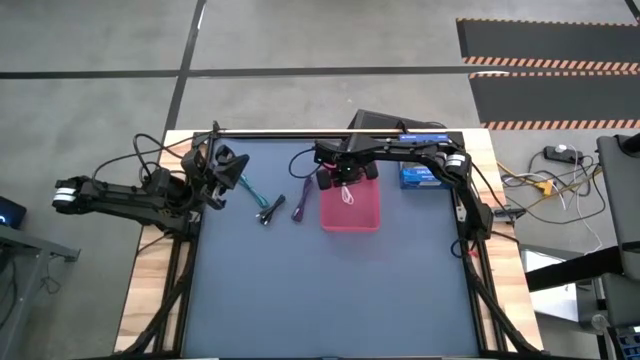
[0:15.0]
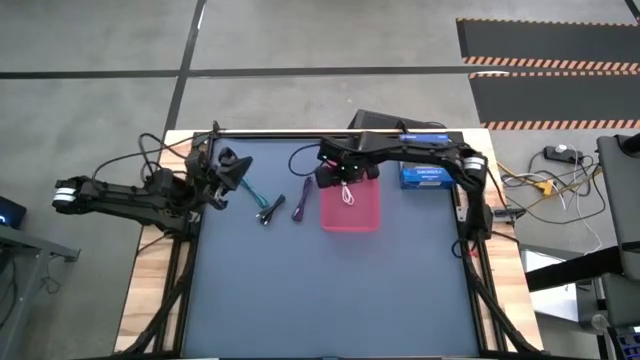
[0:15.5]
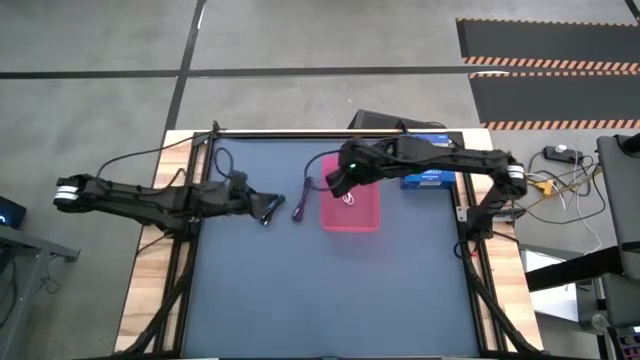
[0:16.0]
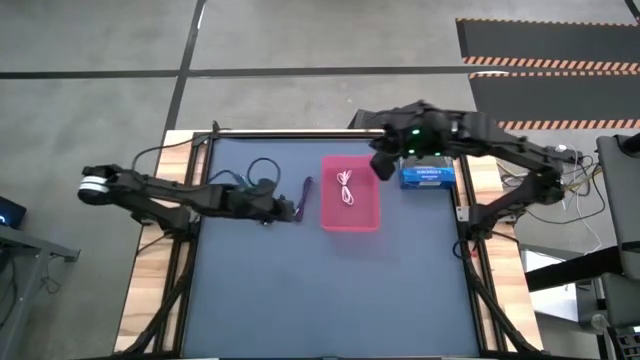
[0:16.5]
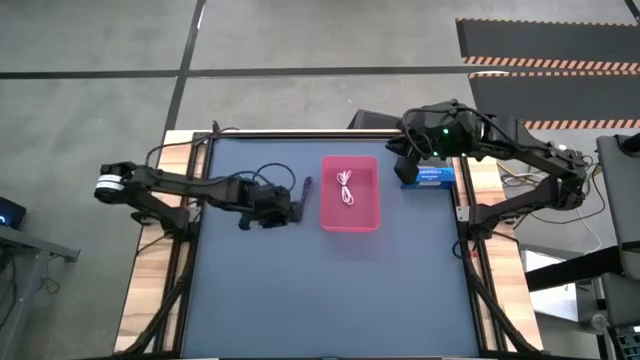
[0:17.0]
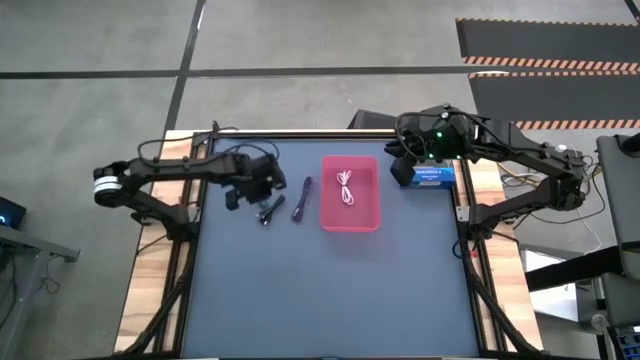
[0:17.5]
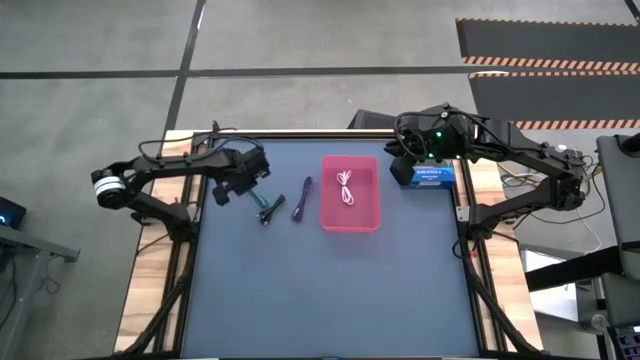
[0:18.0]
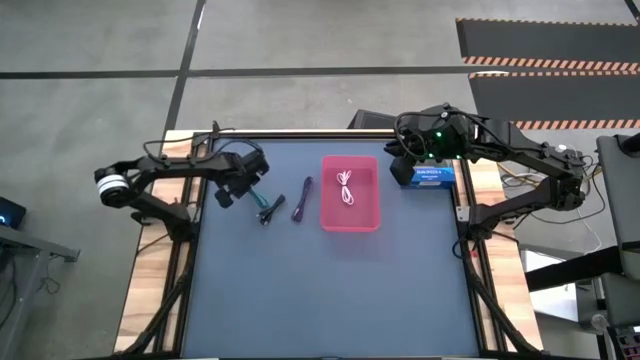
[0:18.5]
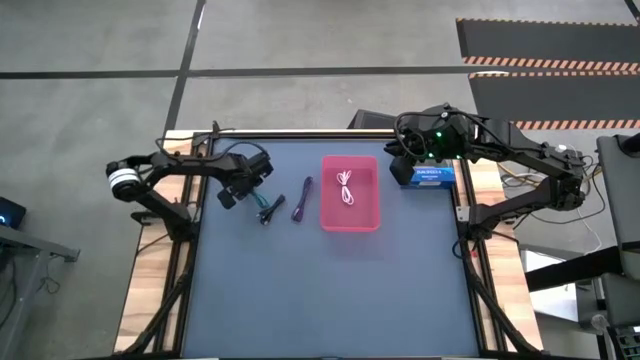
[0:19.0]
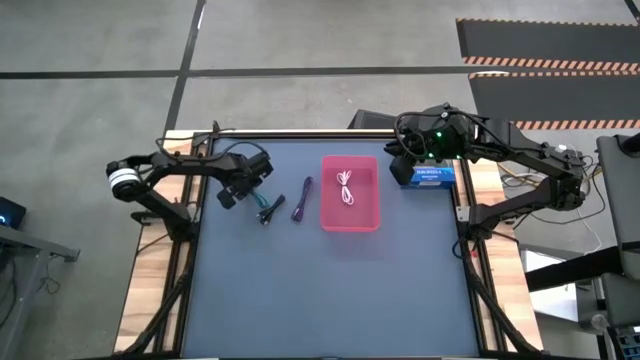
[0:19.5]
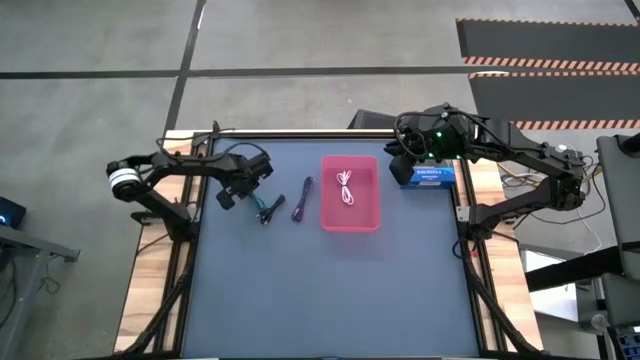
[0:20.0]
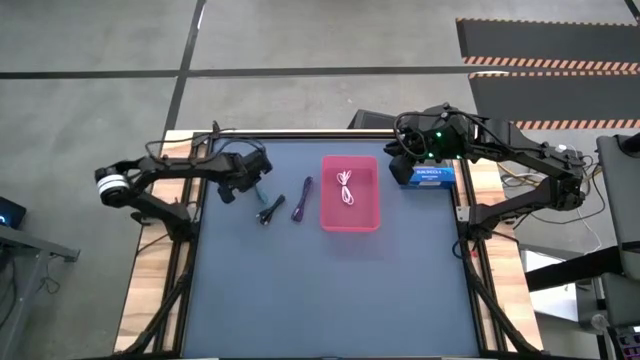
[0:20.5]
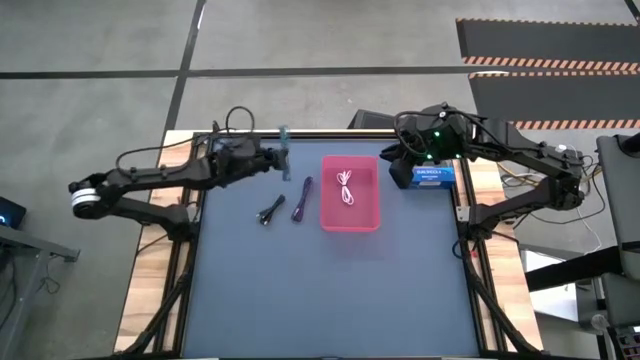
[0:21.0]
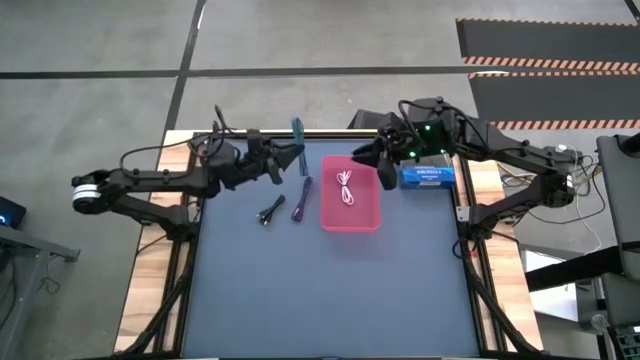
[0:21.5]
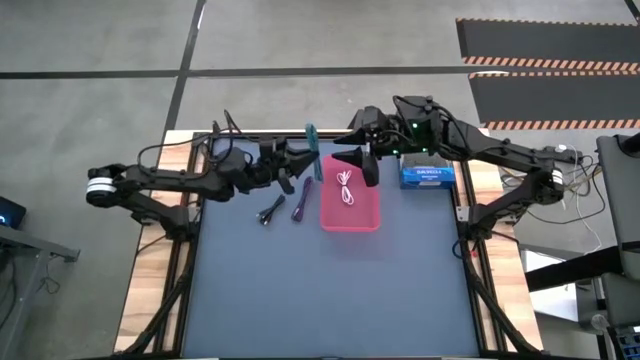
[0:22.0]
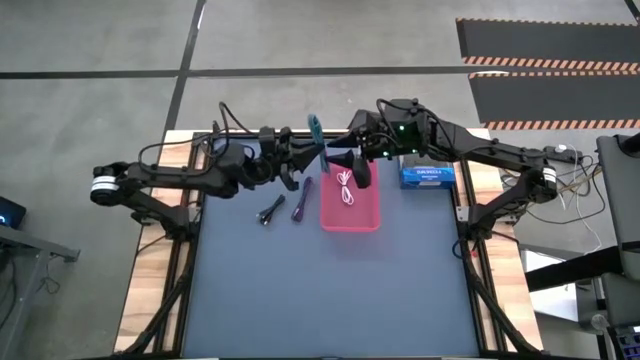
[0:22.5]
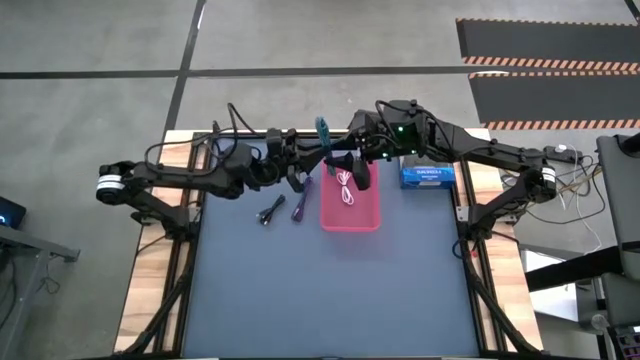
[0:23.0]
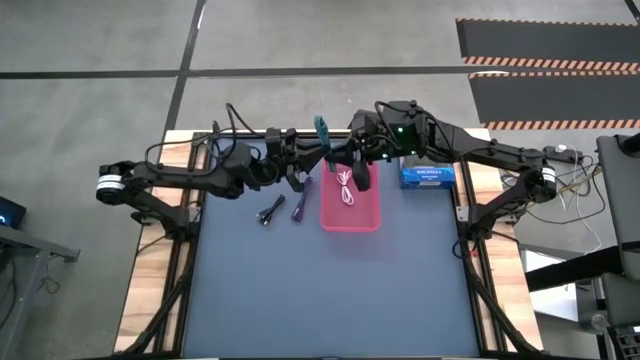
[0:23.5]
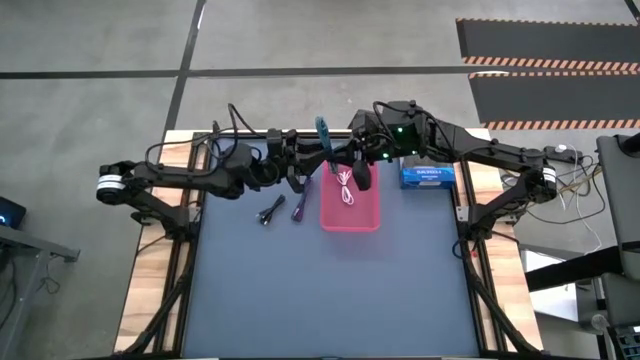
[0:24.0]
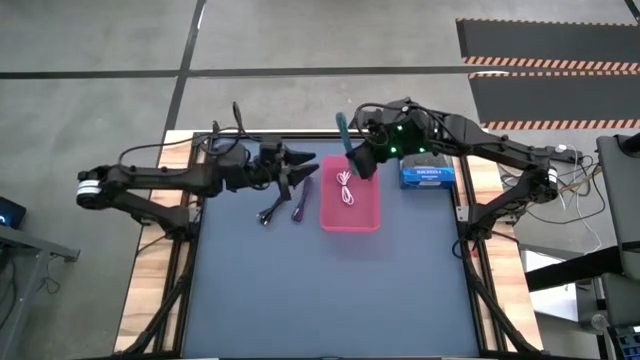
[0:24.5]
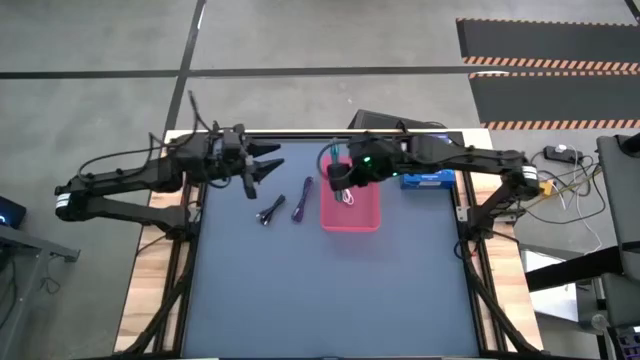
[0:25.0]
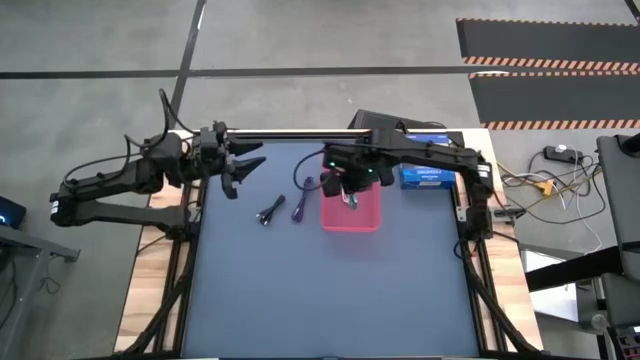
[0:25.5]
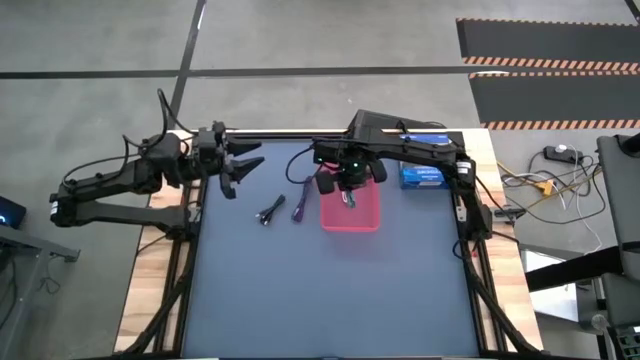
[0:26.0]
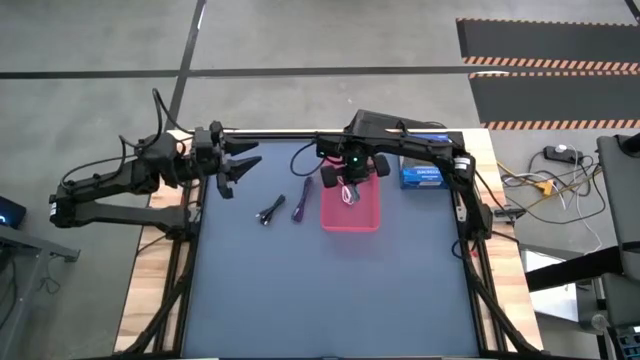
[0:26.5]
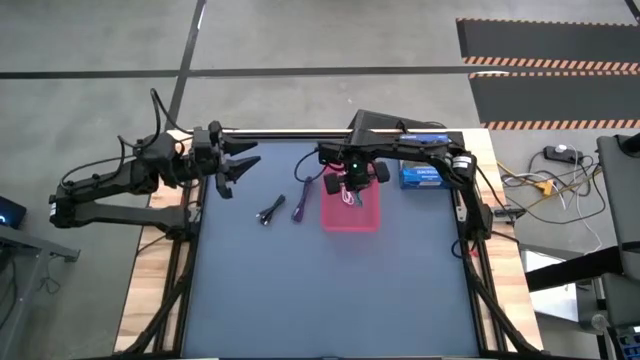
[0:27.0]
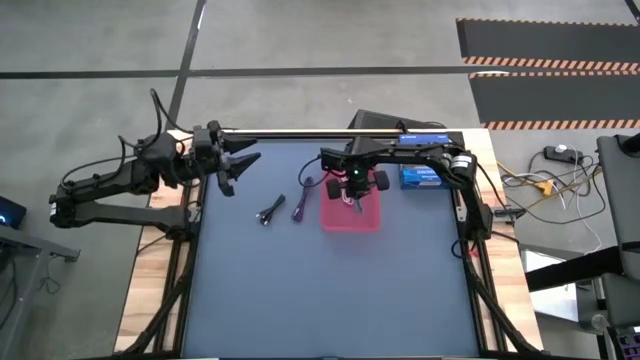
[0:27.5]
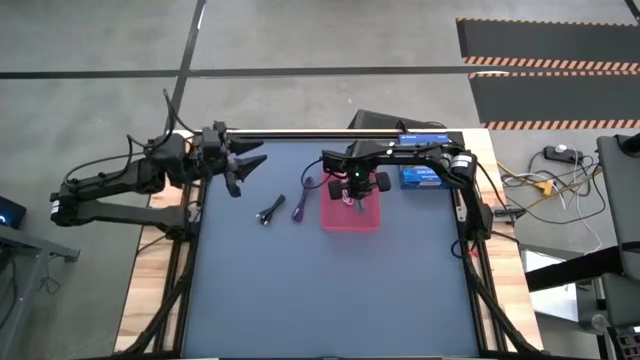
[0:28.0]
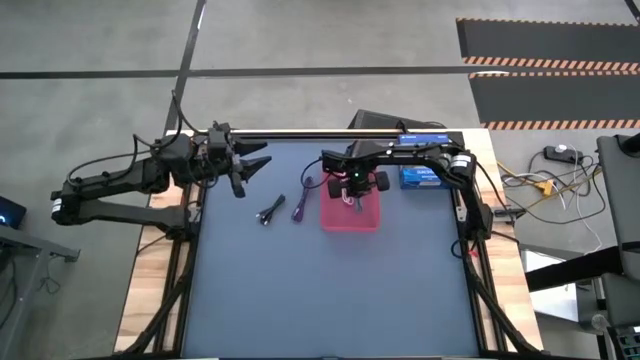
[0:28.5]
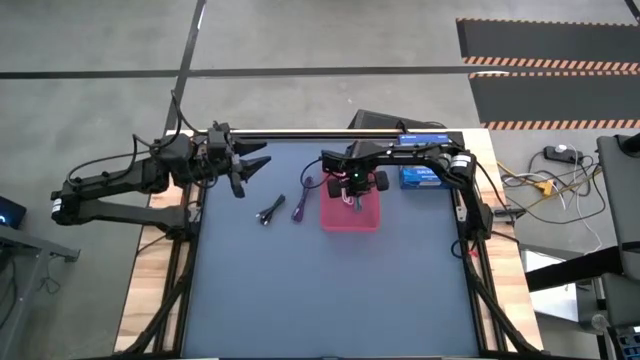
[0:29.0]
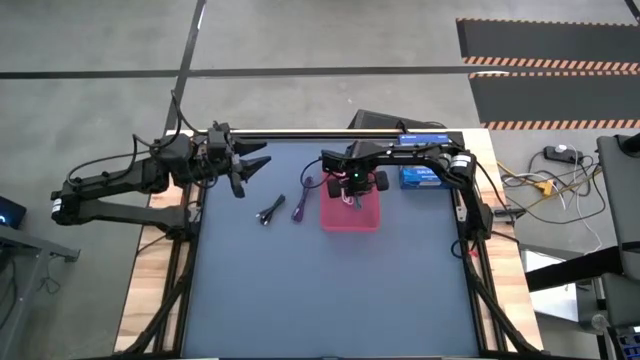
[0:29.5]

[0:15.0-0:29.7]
Task: Pick and place USB-C Cables
Put the blue USB cable into the red bin

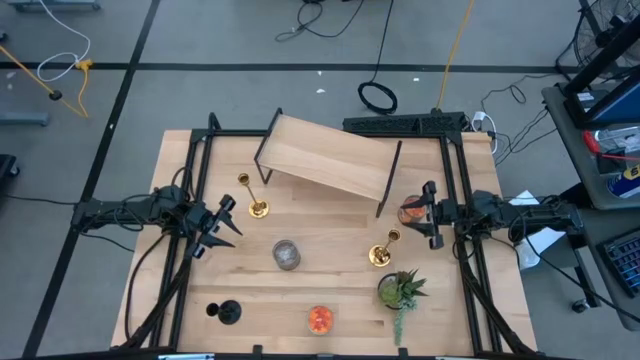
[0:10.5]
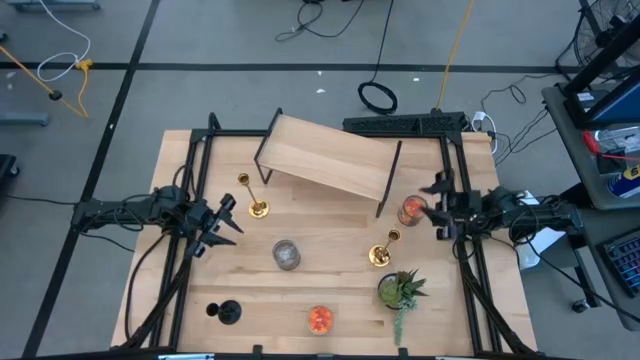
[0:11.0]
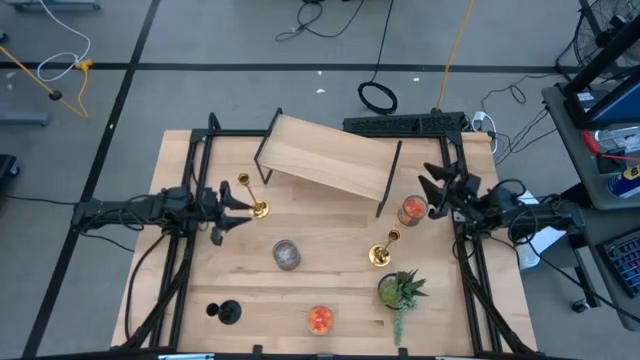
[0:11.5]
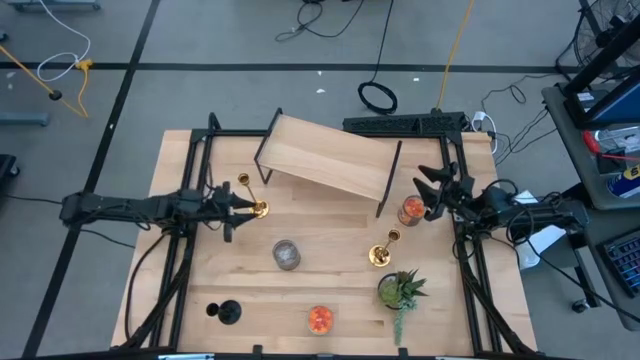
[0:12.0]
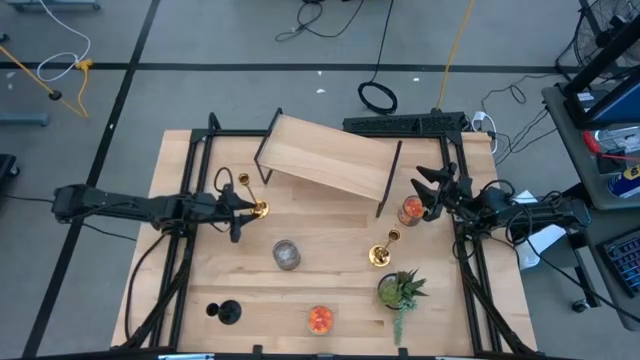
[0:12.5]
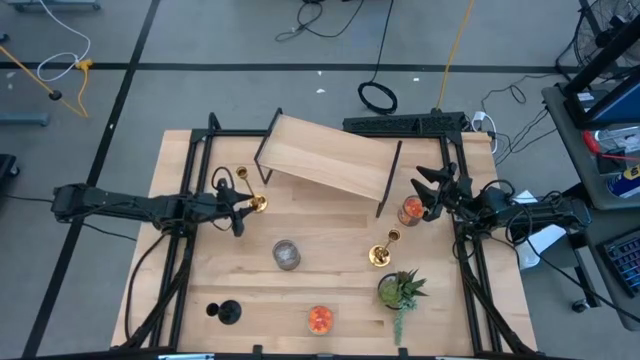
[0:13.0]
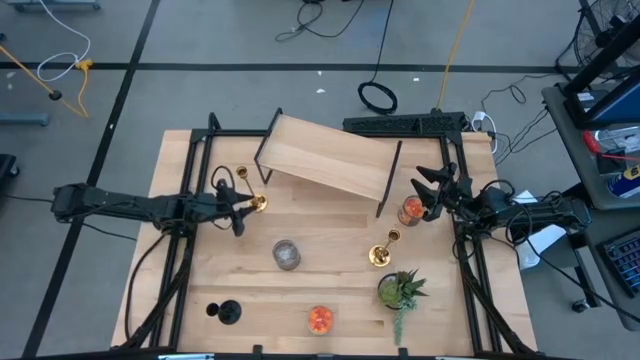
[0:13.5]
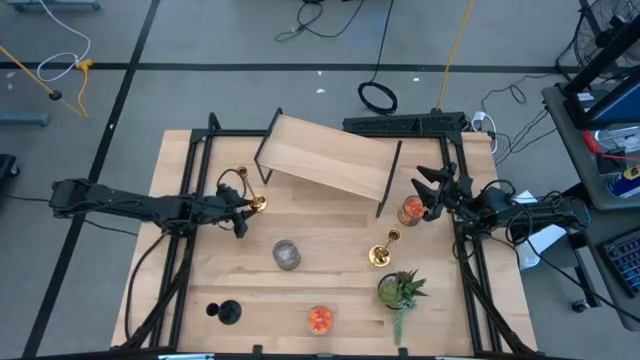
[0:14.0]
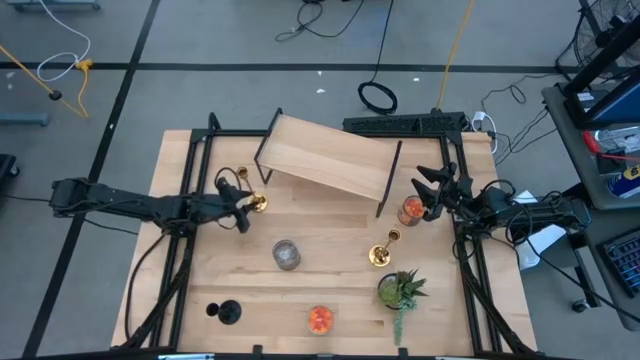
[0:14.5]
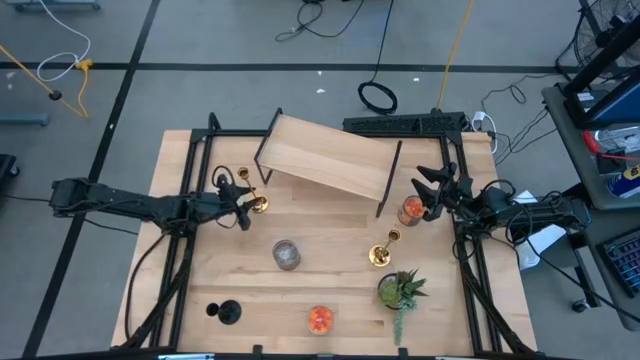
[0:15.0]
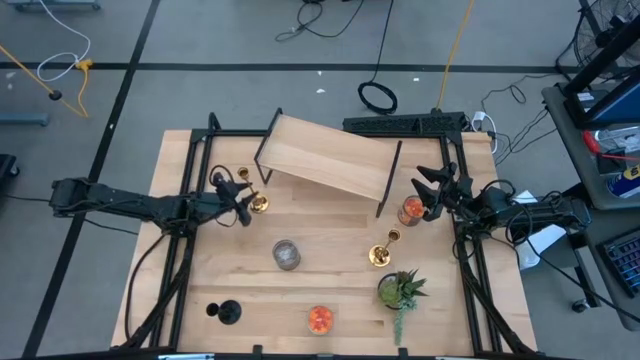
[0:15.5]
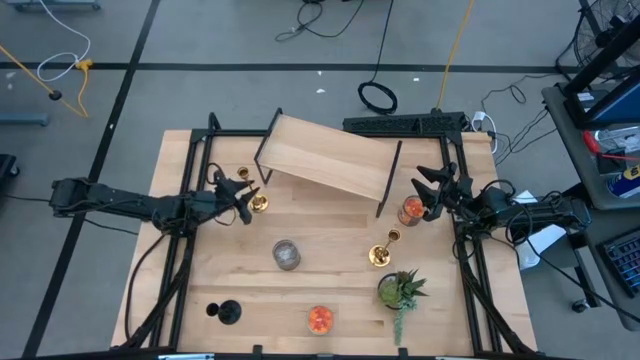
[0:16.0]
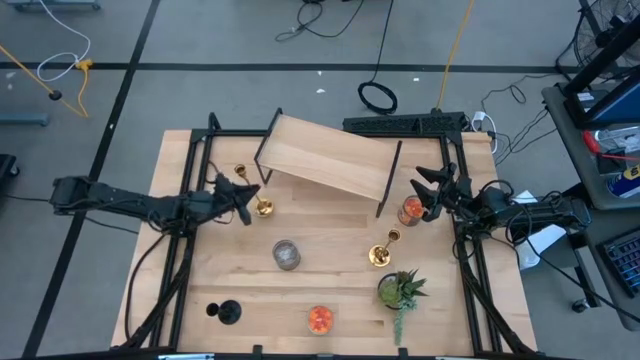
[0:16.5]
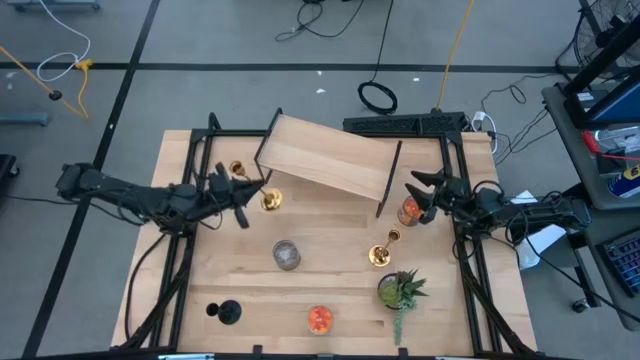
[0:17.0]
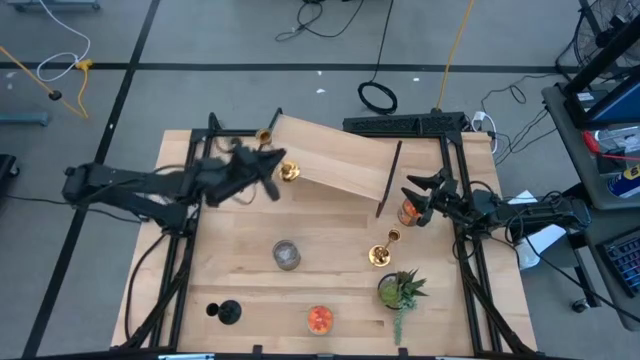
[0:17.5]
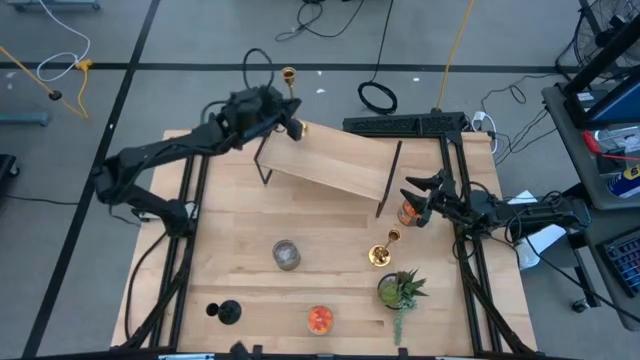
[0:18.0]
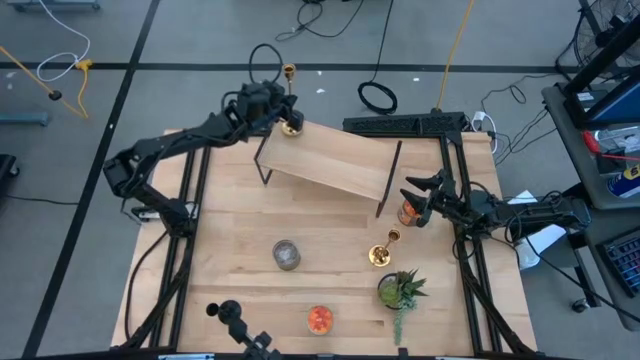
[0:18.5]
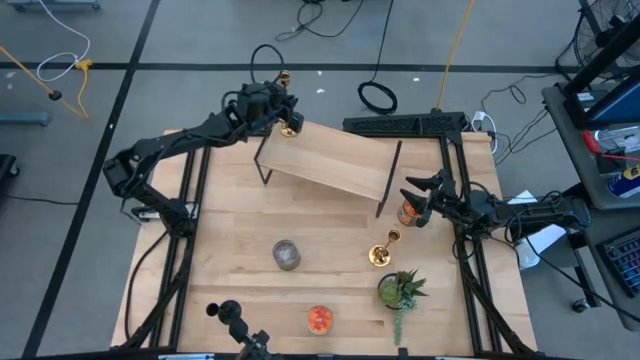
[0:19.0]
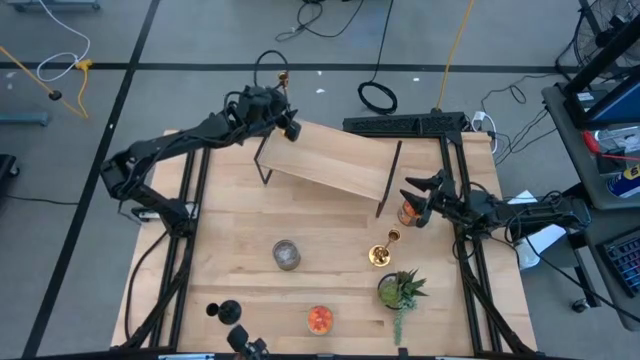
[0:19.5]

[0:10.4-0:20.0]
Task: Pick & Place candle stick holders
Put the left gold candle holder on the shelf
